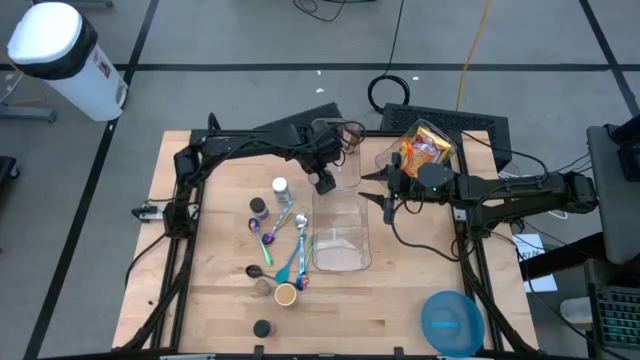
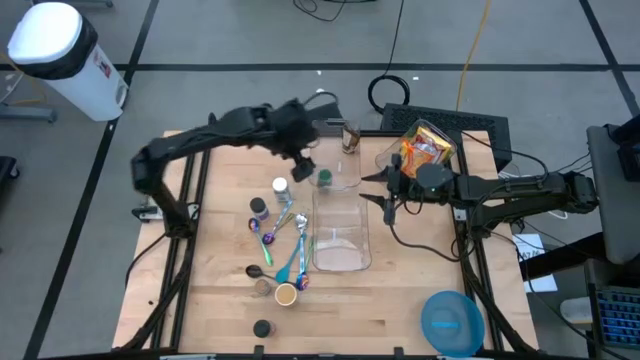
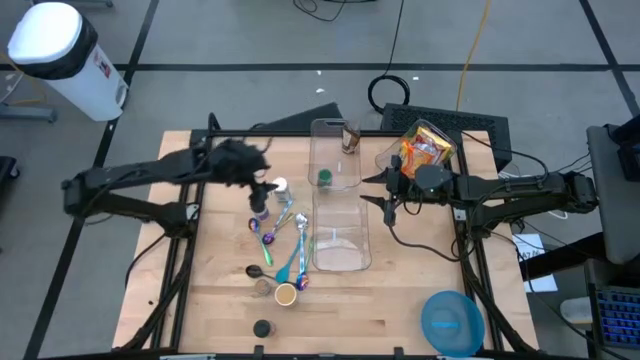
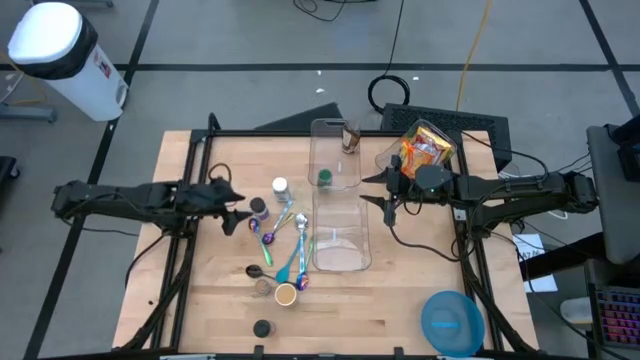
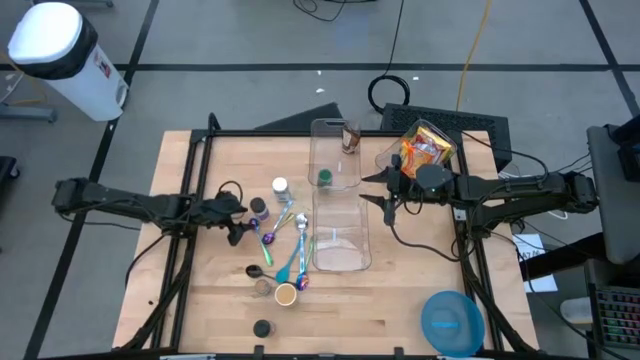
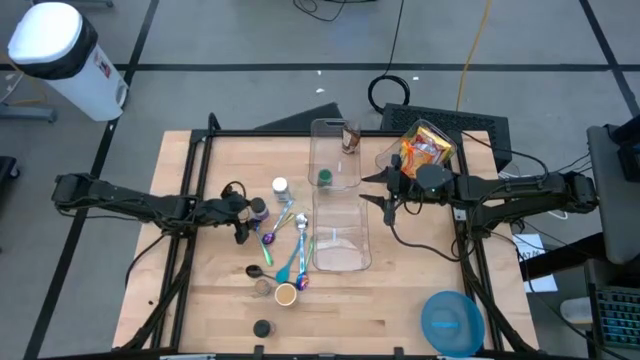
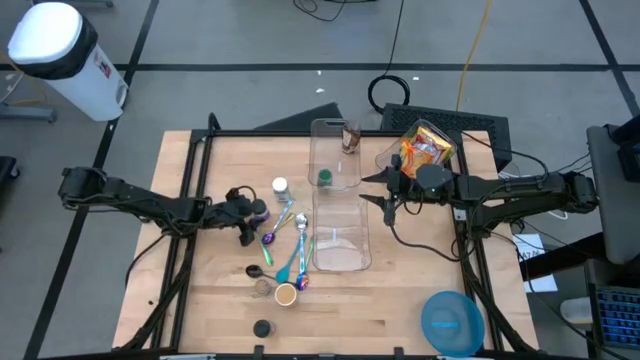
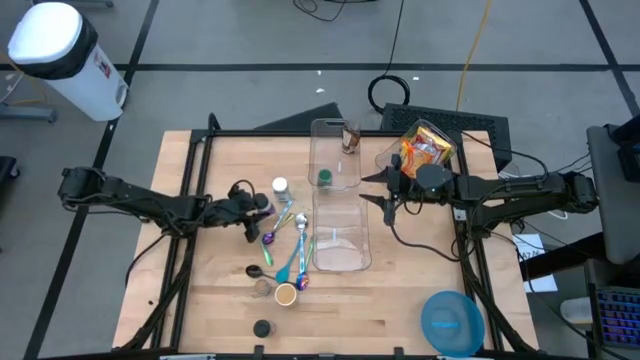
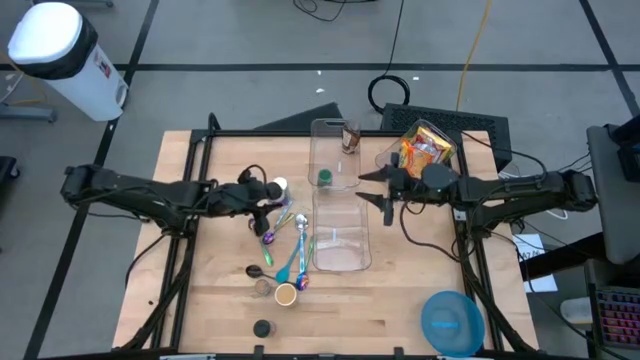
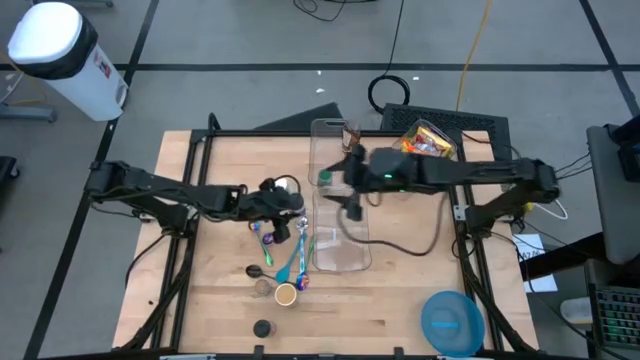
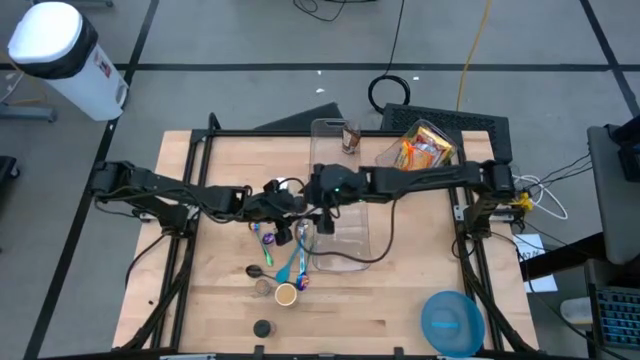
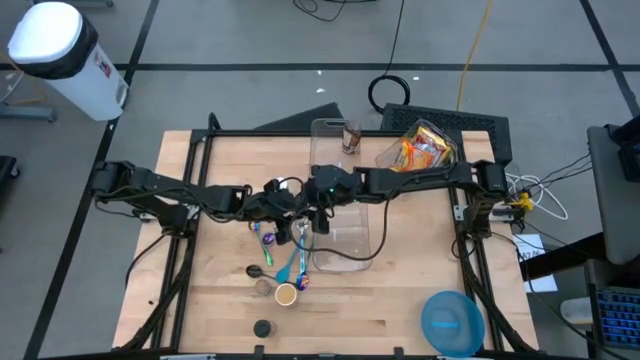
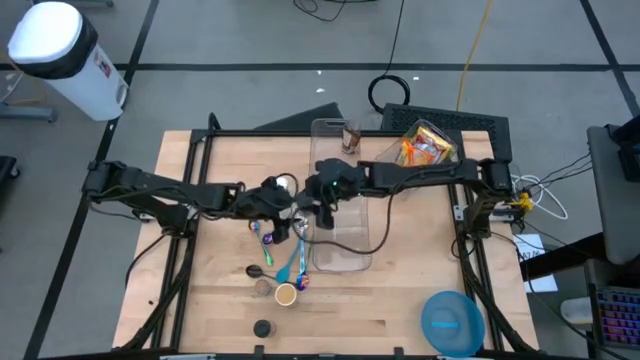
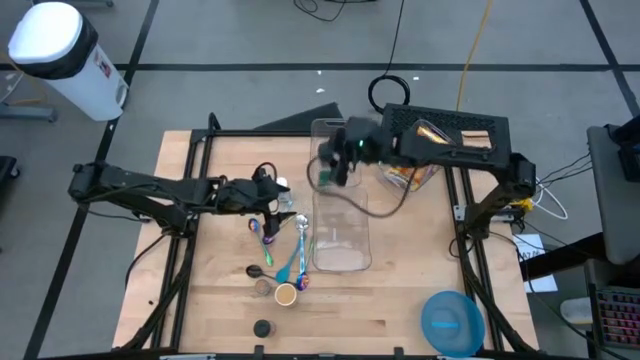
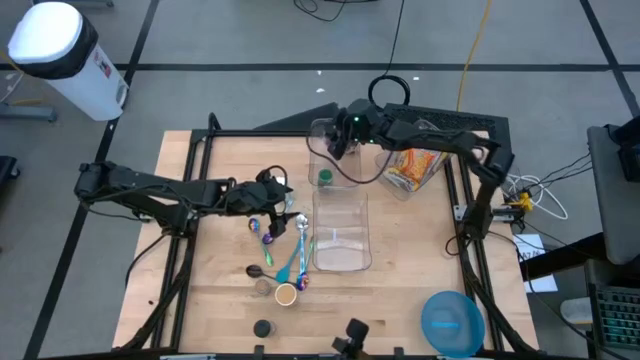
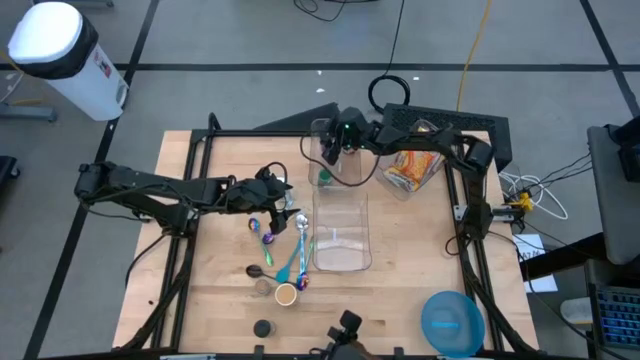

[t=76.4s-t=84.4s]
Task: Pick & Place Food Item
Put the purple spice bottle into the top left transparent bin

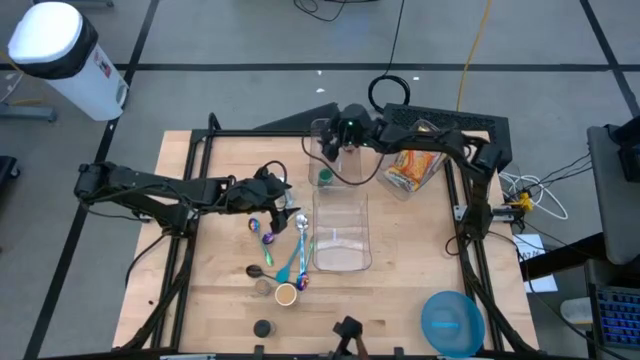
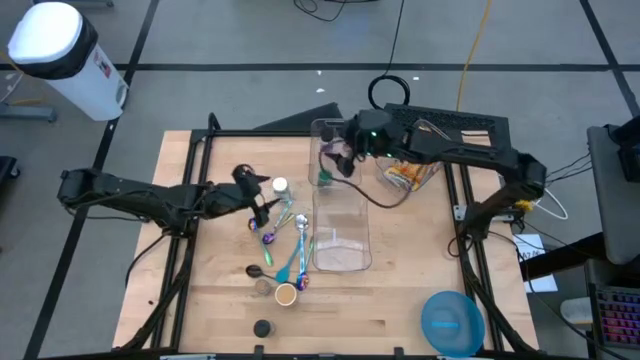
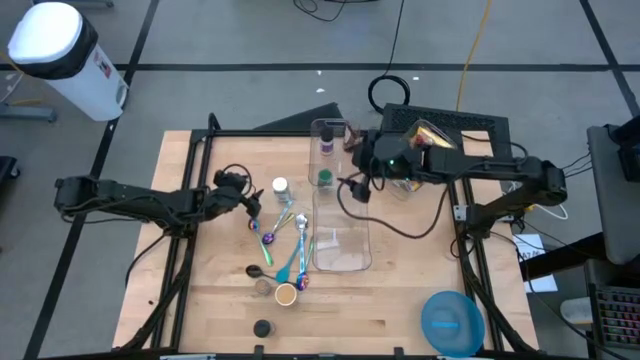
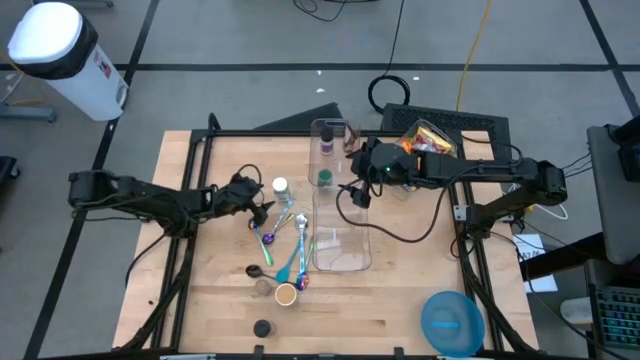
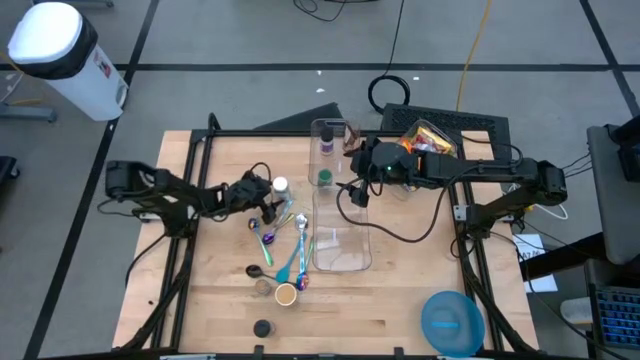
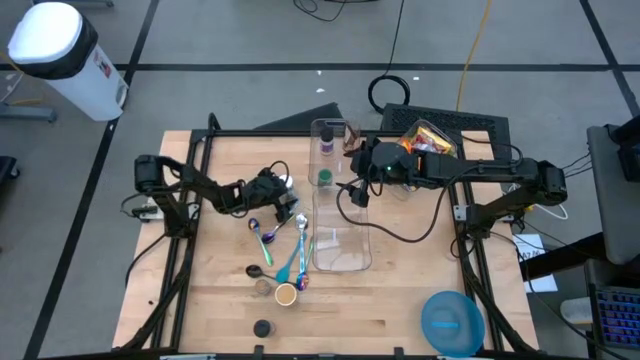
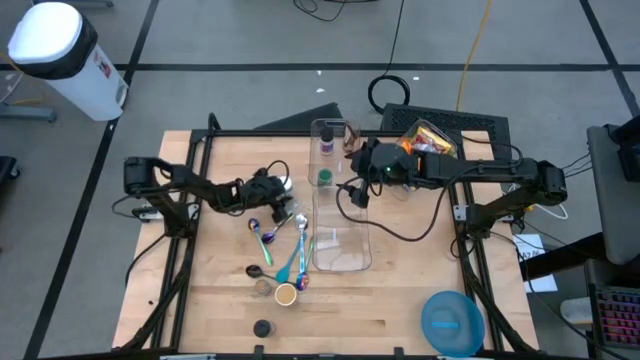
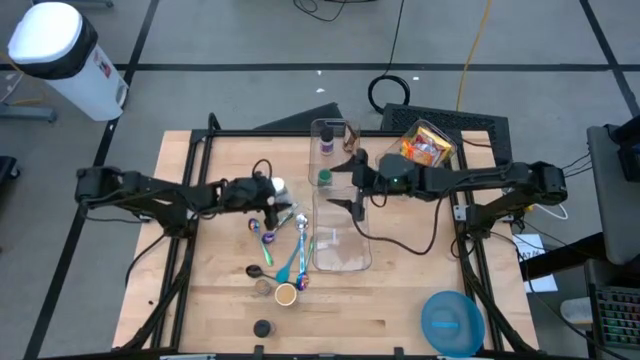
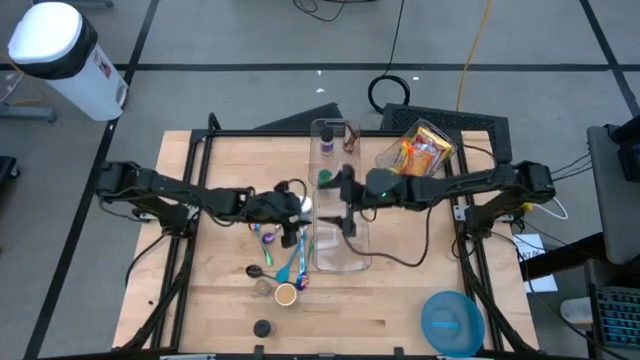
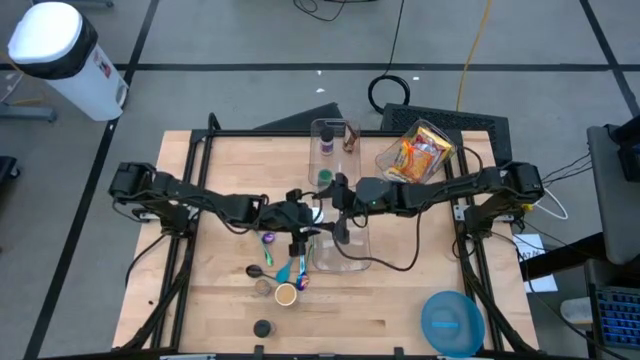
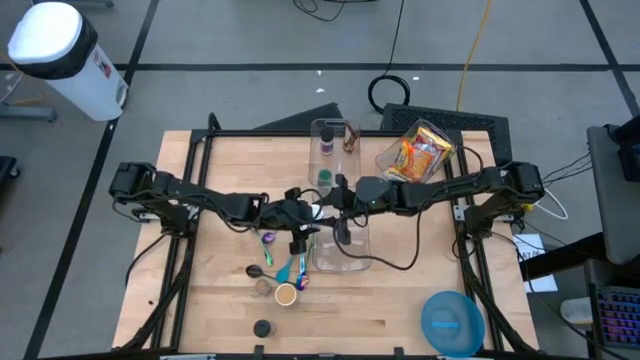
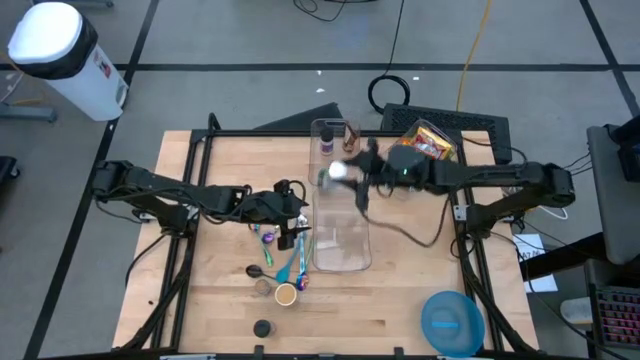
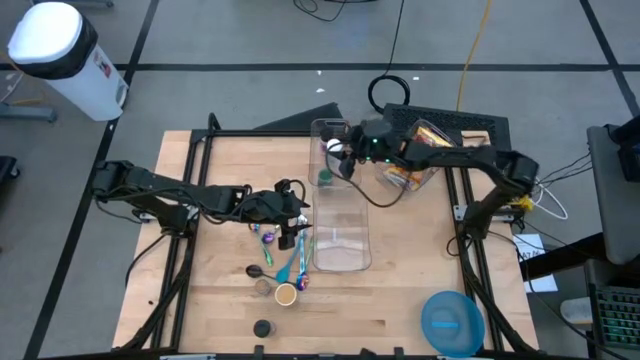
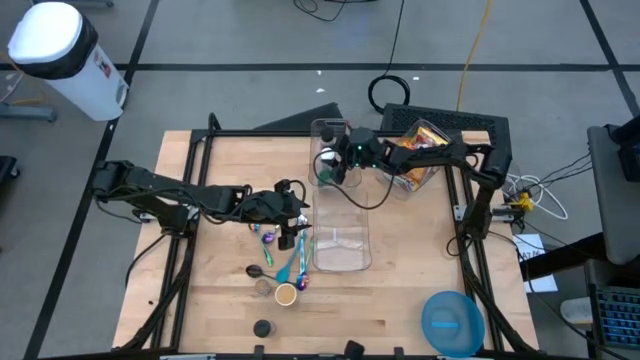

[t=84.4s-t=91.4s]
Put the white spice bottle into the top left transparent bin

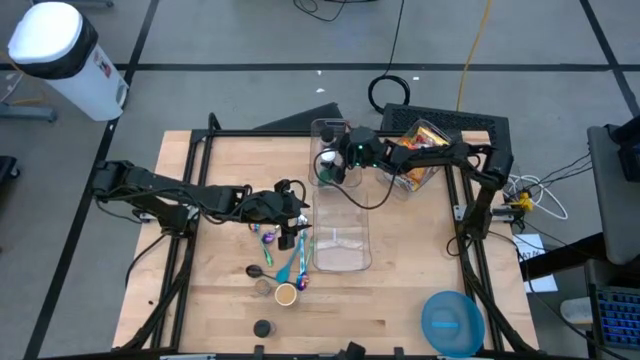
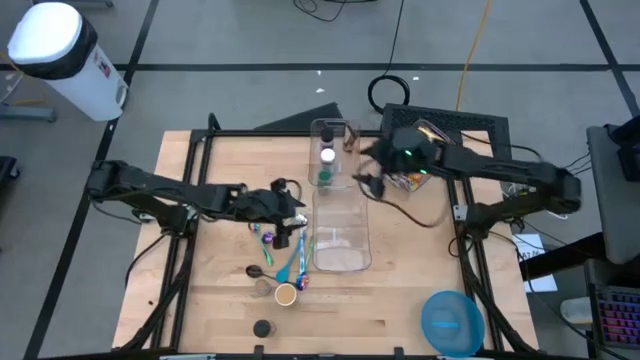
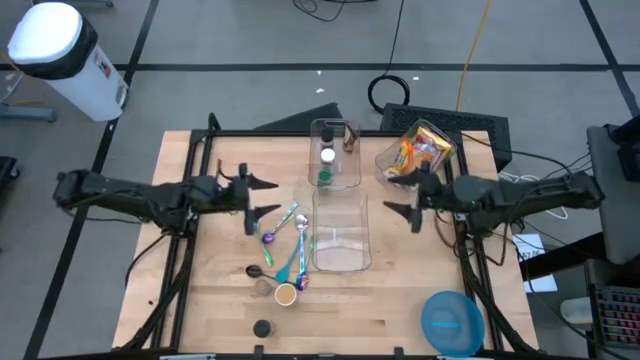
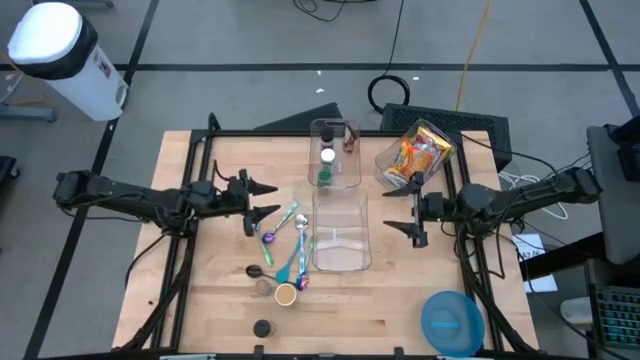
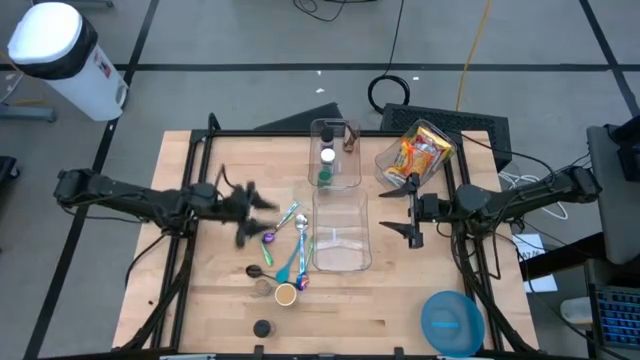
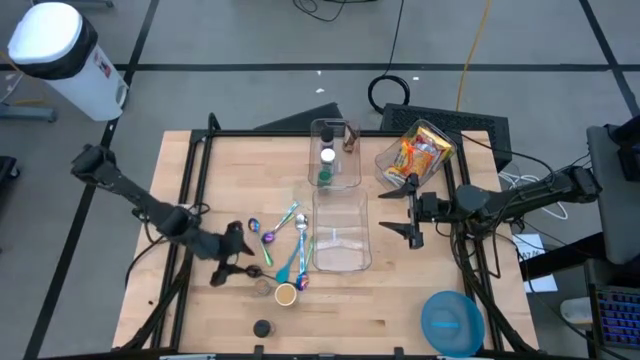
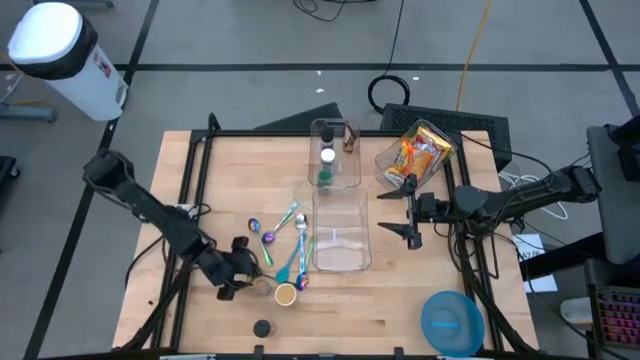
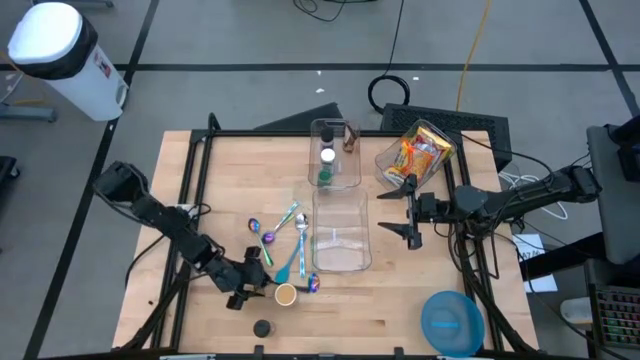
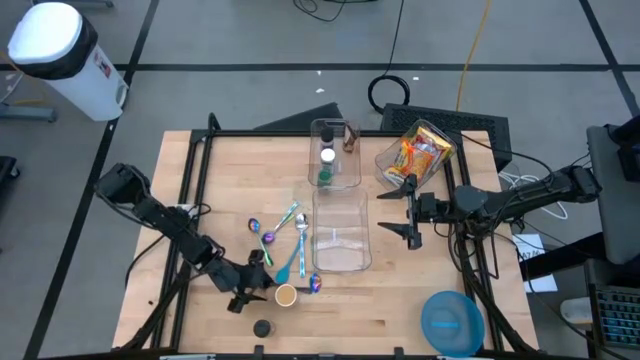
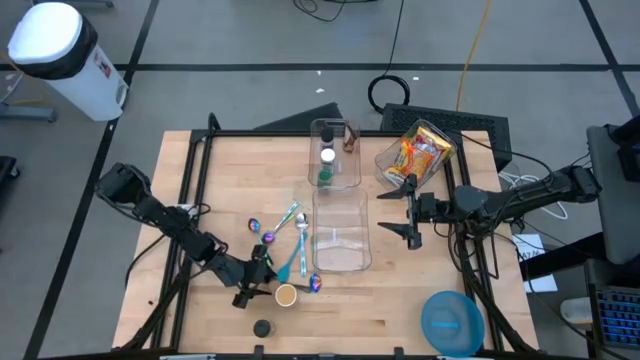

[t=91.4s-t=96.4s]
Put the brown spice bottle into the top left transparent bin

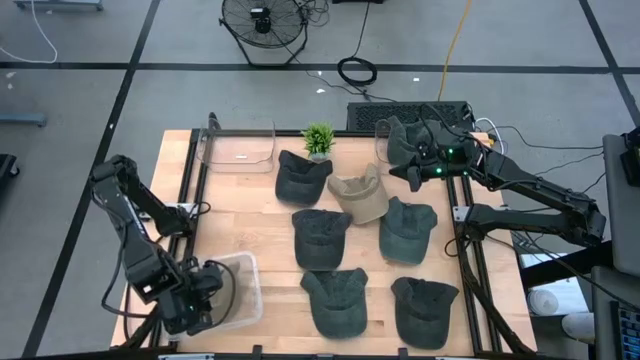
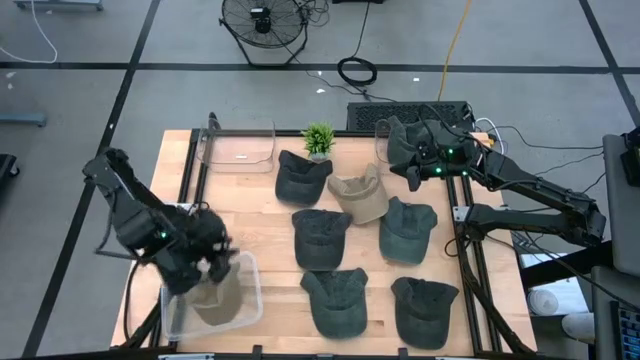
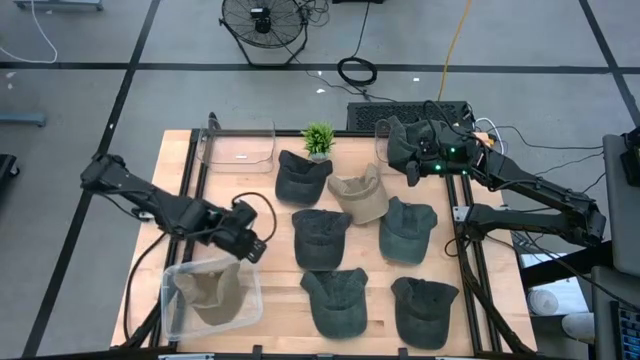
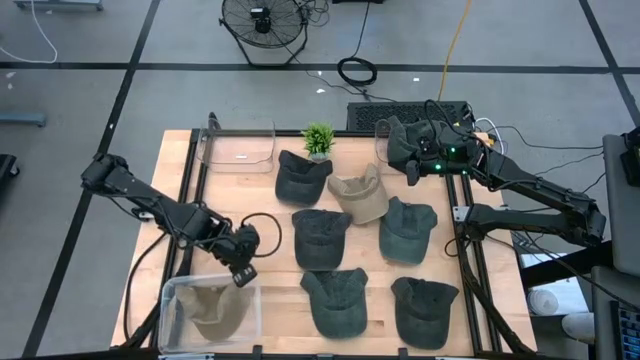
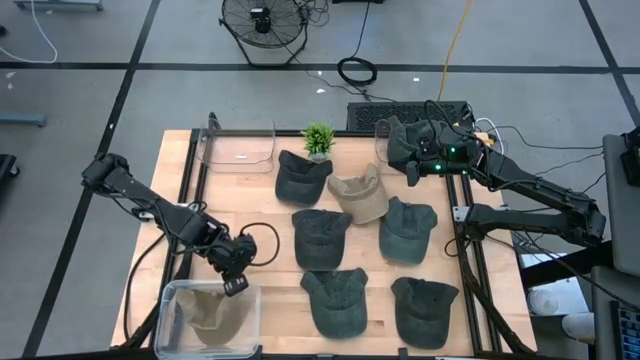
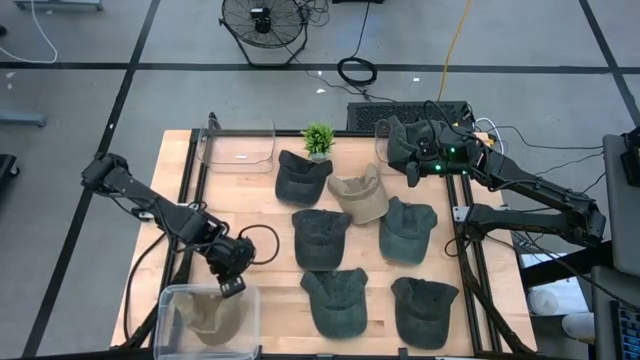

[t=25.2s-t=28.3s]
Task: Pick & Place hat
Adjust the transparent container
